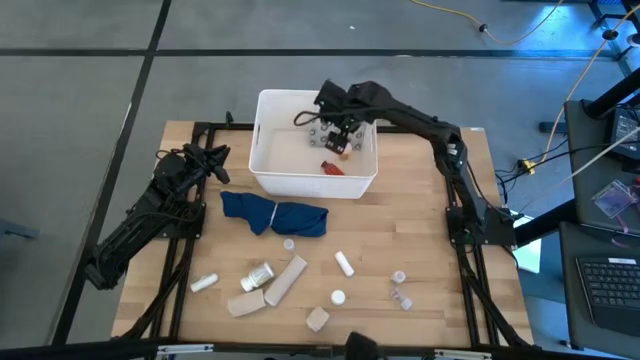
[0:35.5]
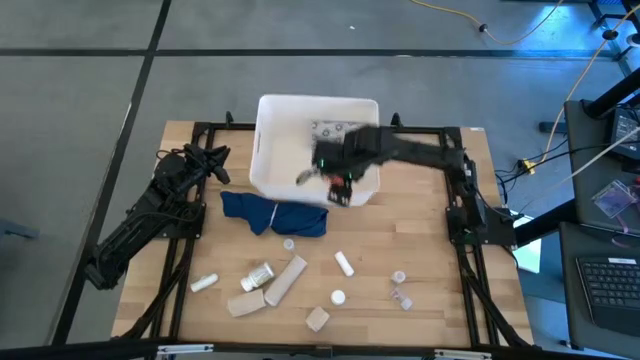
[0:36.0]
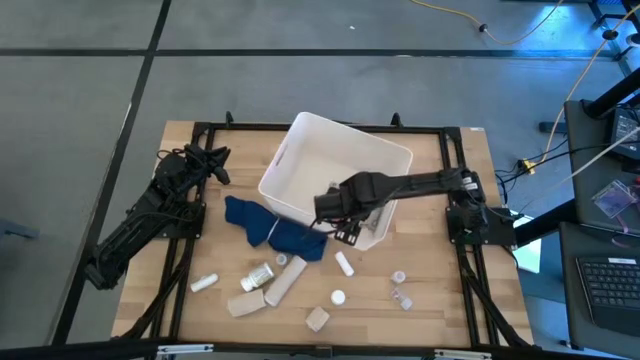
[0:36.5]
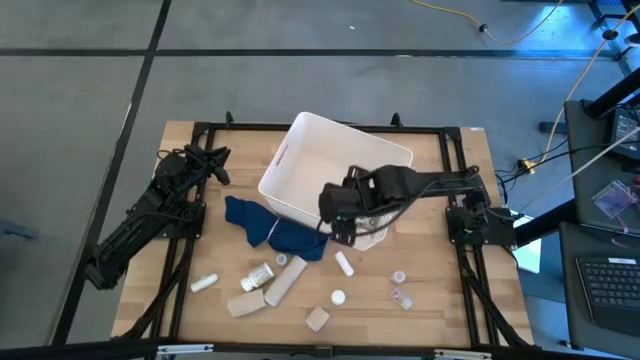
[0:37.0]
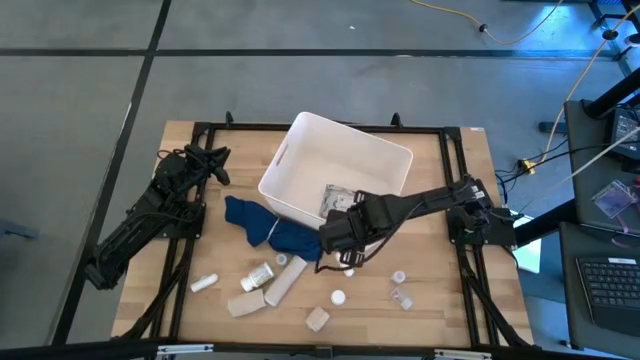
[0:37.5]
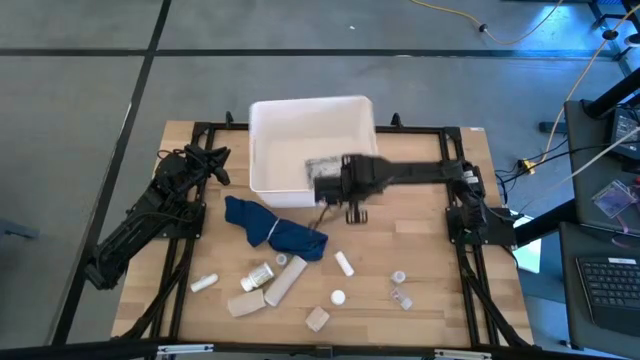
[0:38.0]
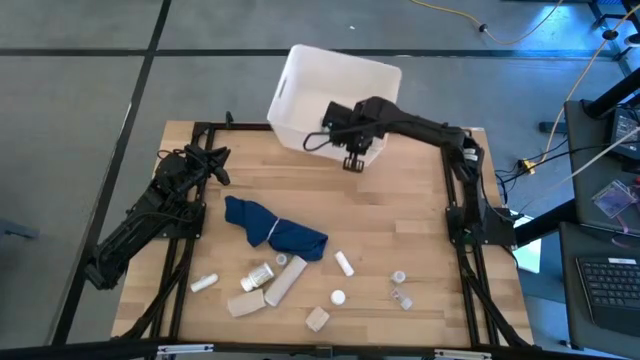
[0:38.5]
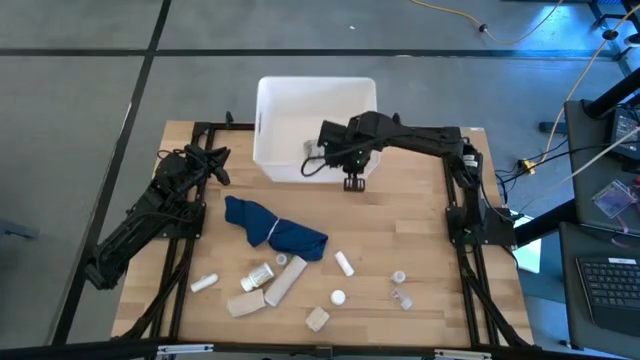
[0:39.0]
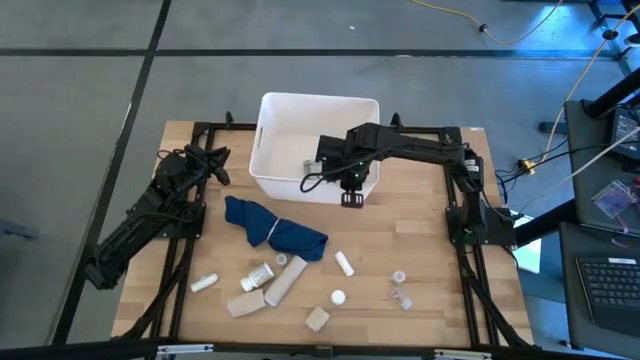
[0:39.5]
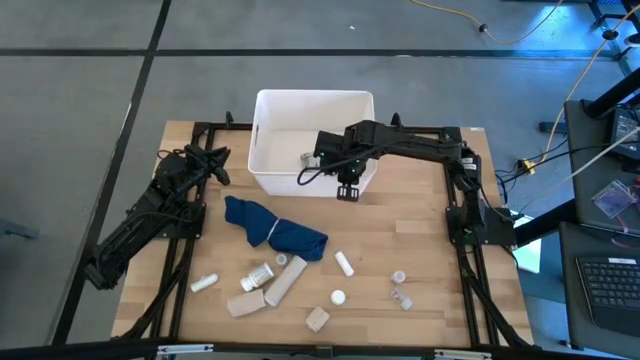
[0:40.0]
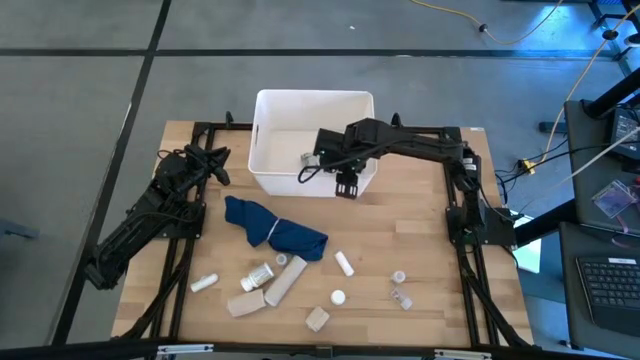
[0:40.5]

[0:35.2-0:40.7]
Task: Pick & place medical supplies in basket/bin
Adjust the white bin

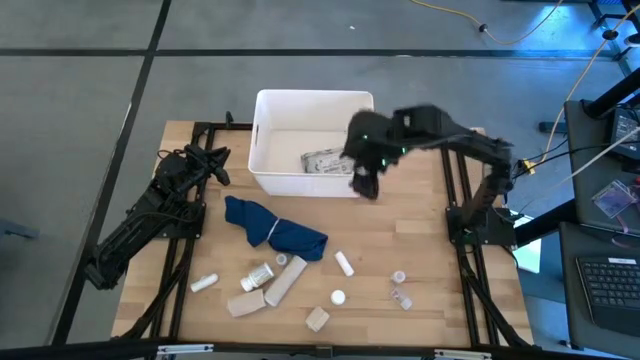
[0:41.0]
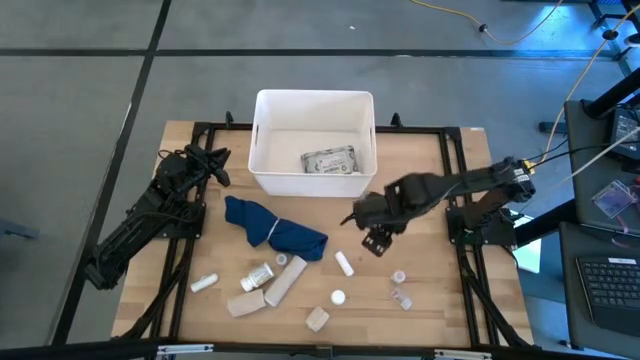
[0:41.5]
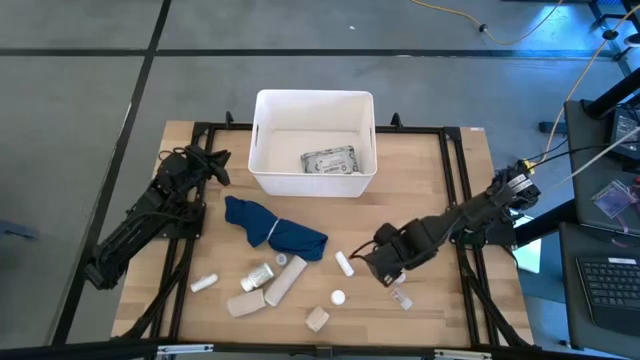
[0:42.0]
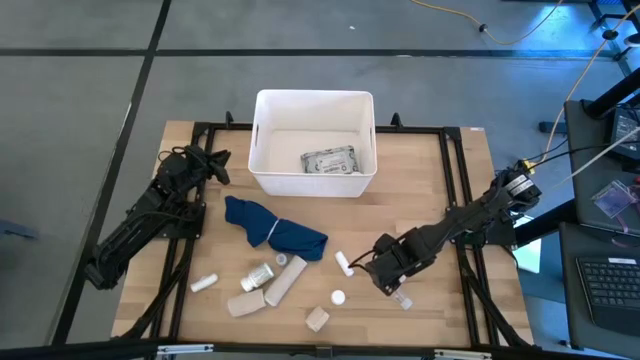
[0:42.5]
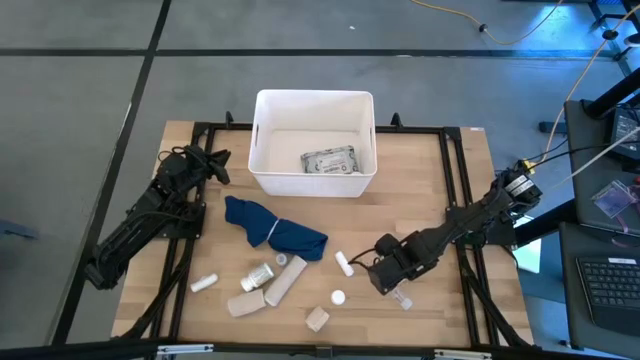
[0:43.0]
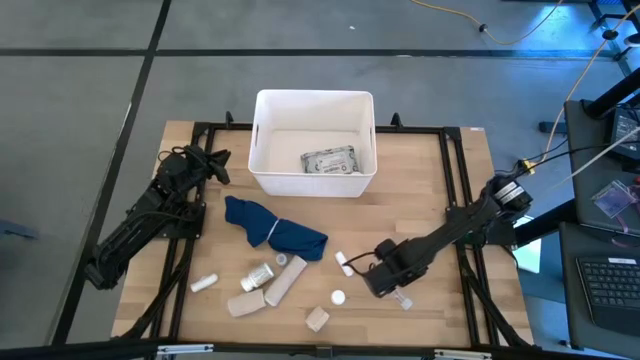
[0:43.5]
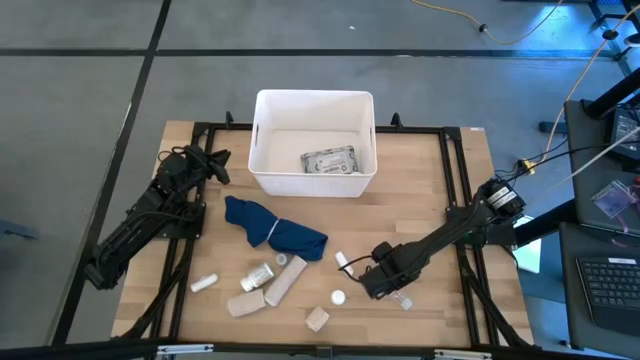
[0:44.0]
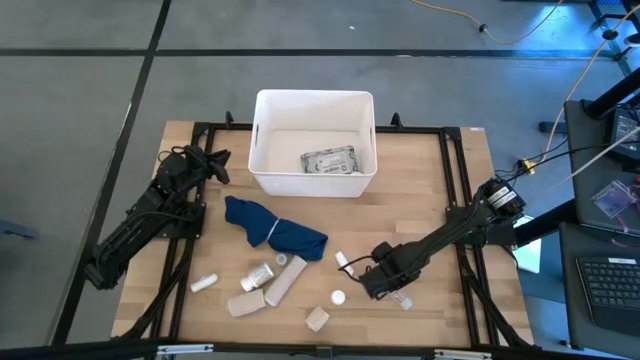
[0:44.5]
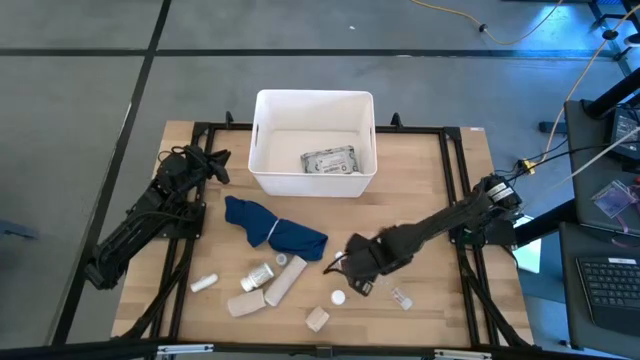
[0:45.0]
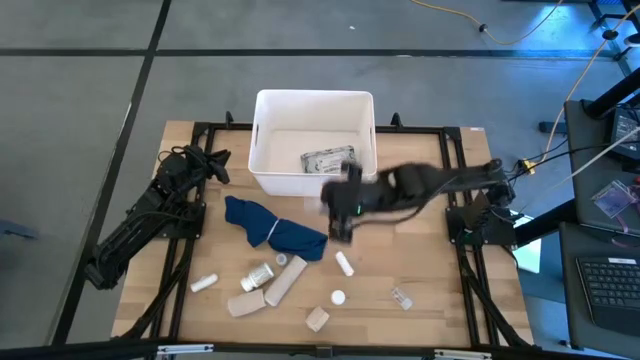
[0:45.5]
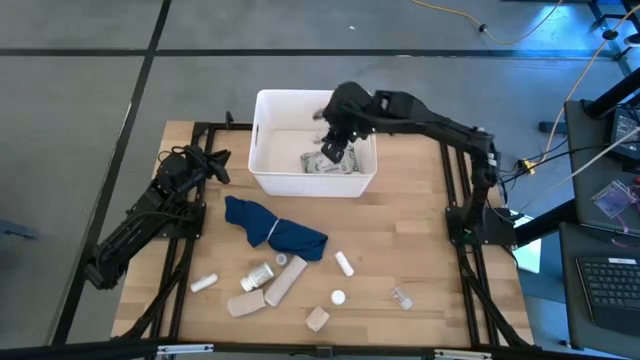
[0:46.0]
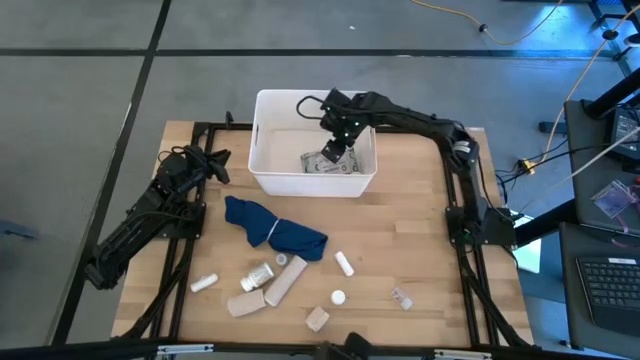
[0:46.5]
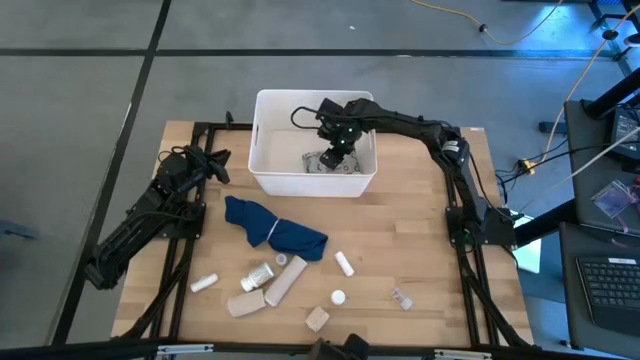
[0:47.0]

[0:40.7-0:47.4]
Put the middle right transparent pill bottle into the white bin

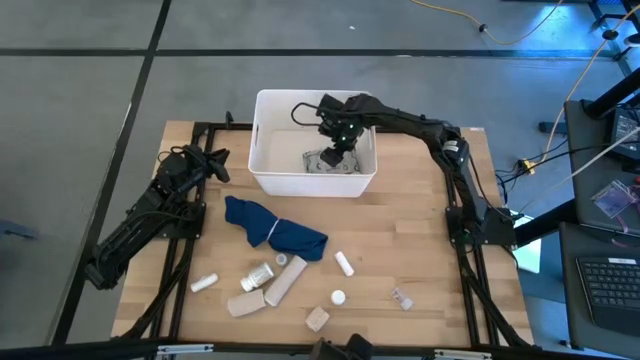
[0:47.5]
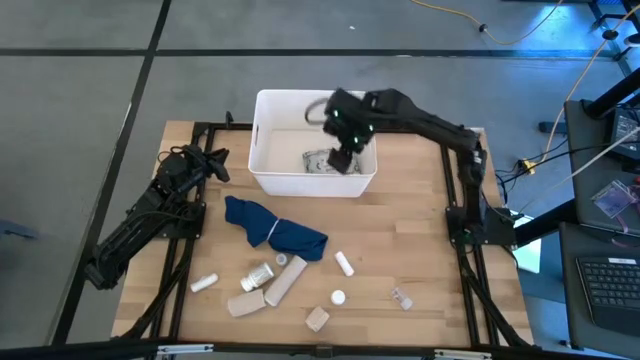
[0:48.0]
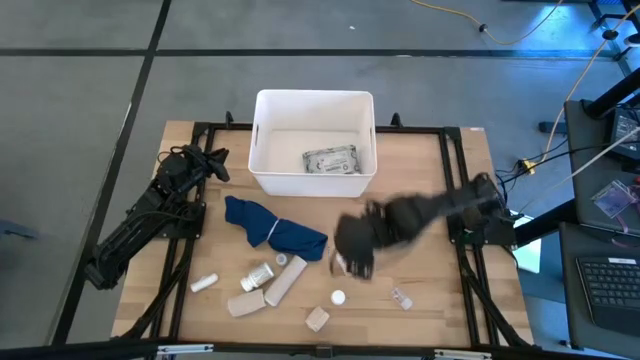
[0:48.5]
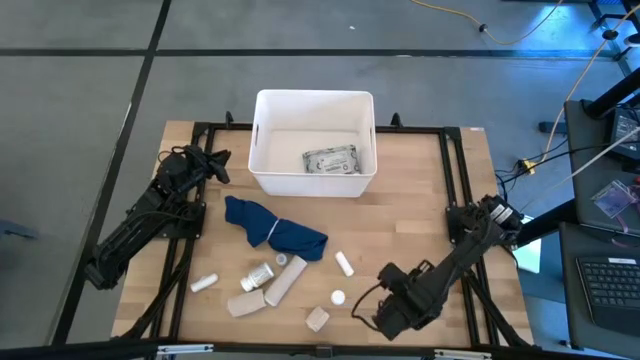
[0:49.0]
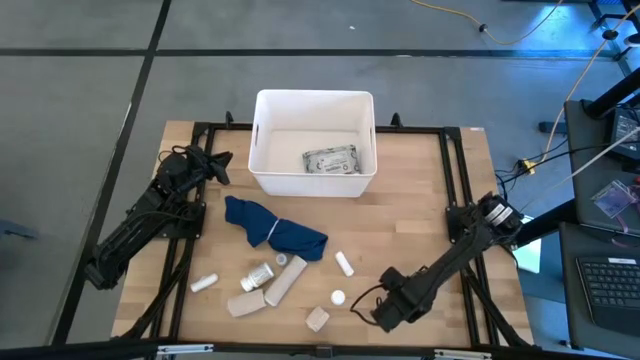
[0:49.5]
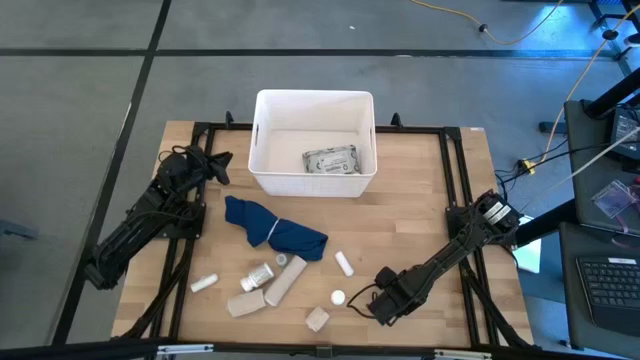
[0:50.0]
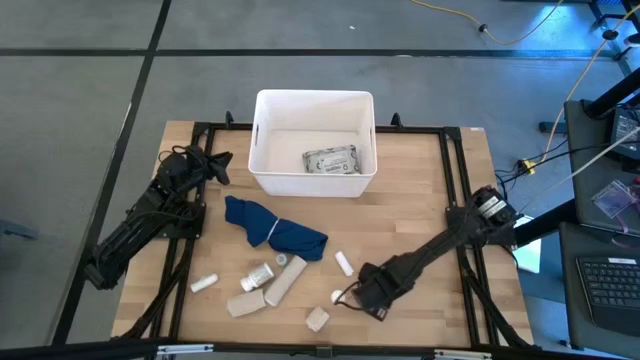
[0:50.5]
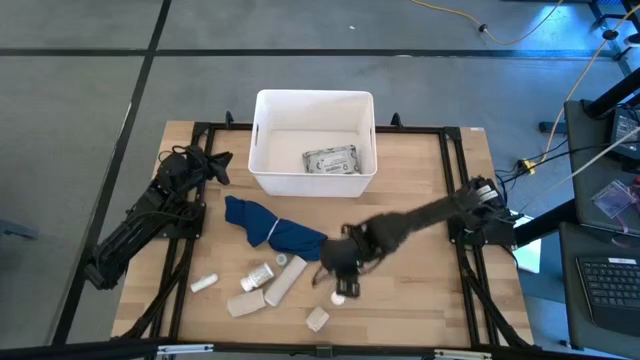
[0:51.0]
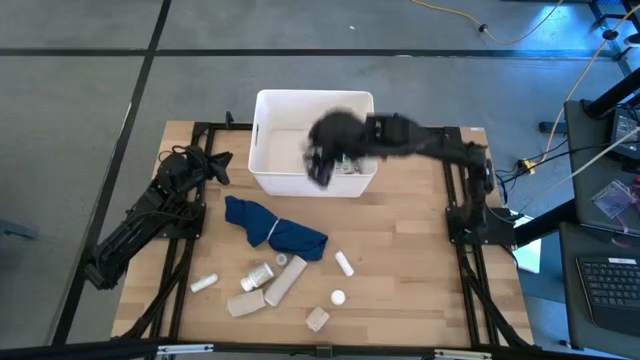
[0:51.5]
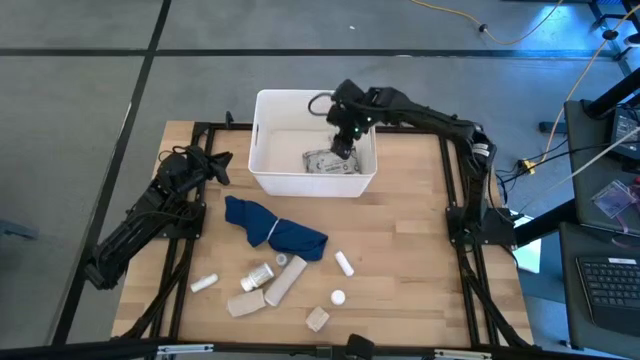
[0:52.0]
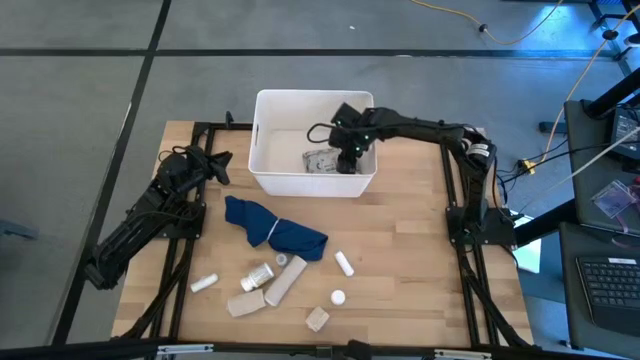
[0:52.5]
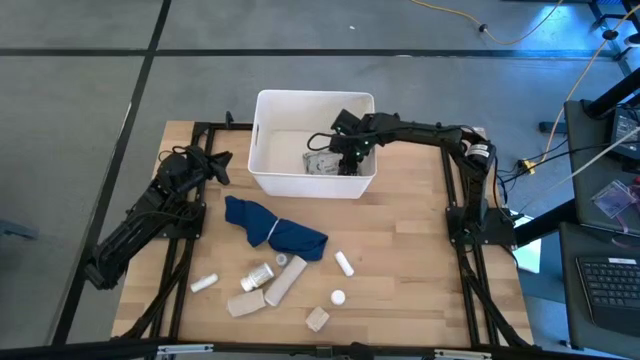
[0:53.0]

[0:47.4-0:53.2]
Put the right transparent pill bottle into the white bin

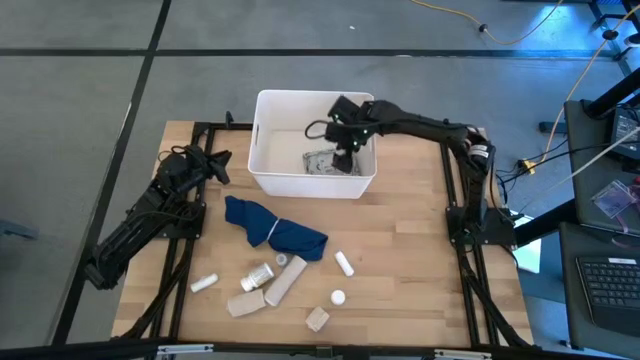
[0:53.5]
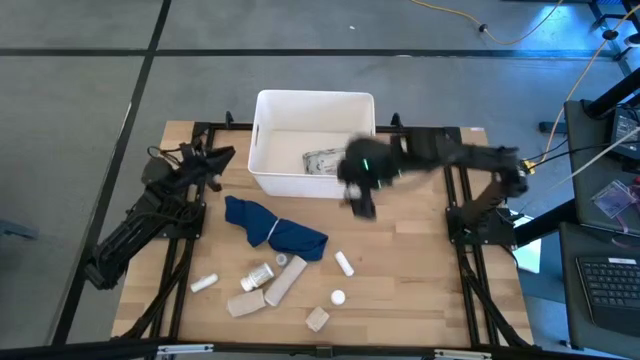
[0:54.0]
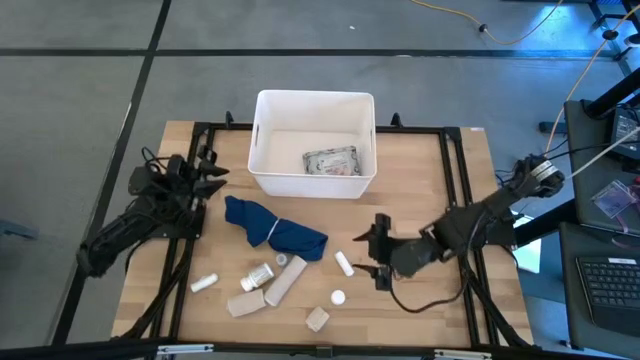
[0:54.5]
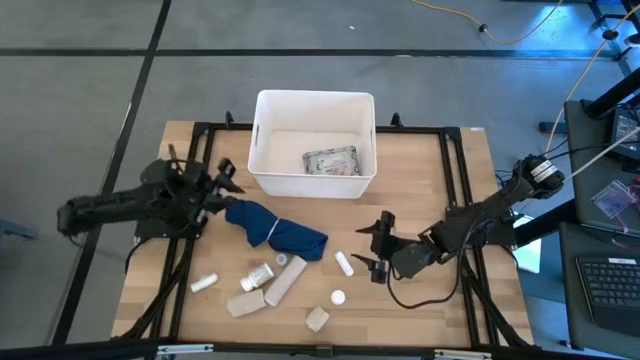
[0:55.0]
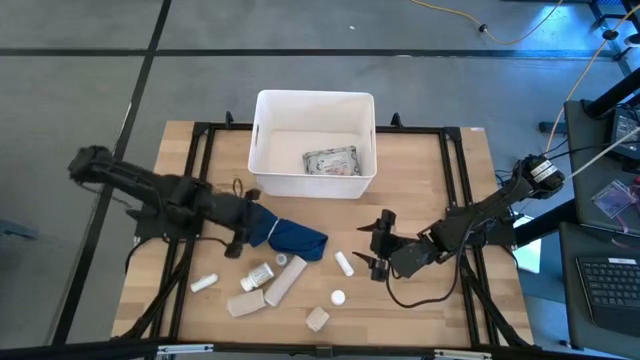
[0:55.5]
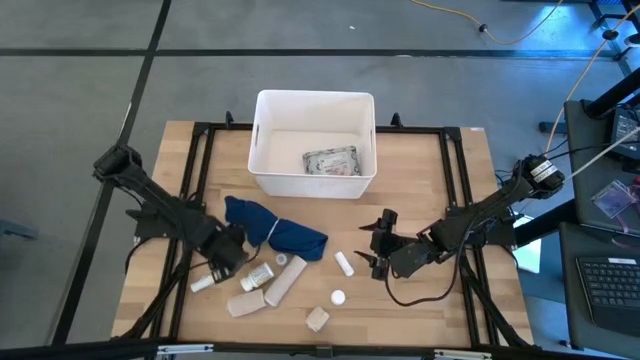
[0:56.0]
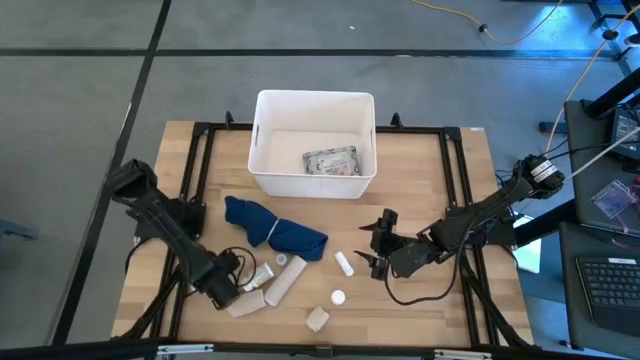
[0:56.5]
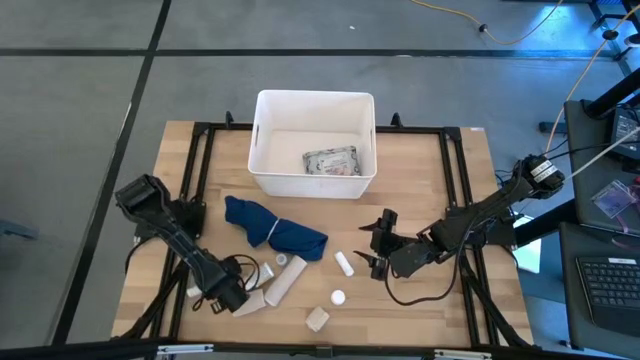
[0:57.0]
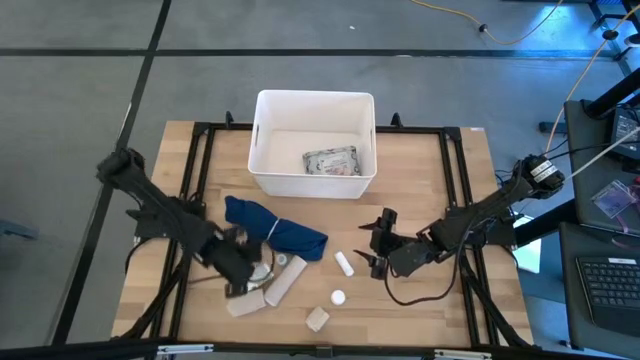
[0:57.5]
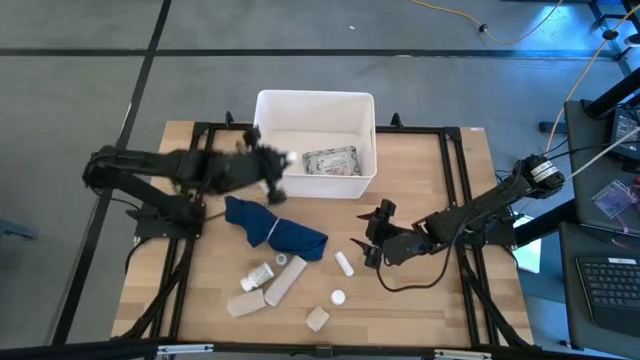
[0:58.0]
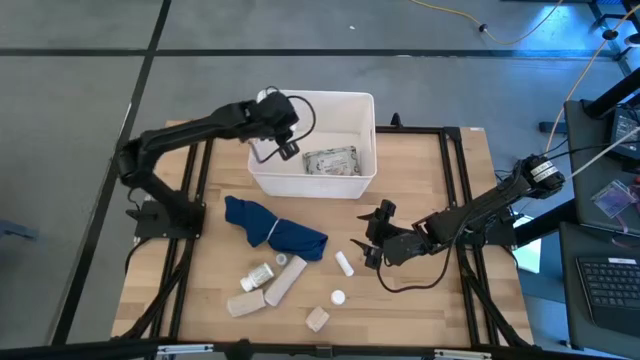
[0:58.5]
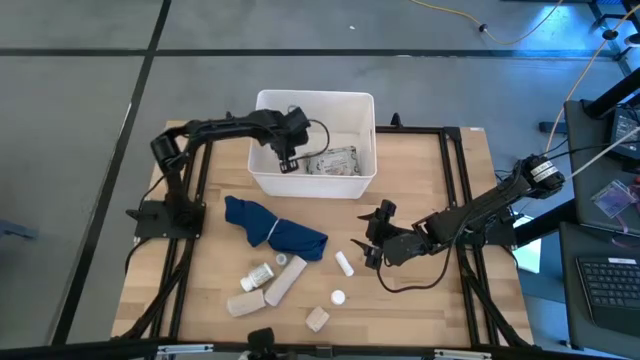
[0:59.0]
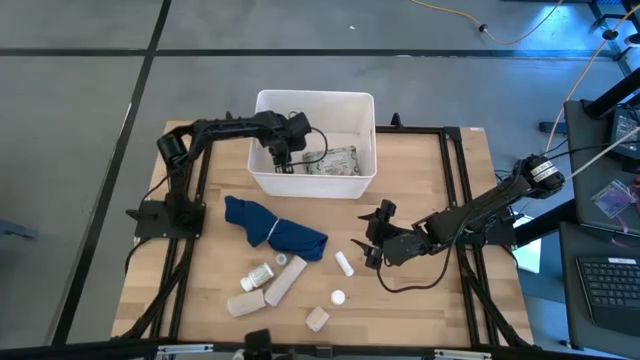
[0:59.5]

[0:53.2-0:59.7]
Put the left white bandage into the white bin
